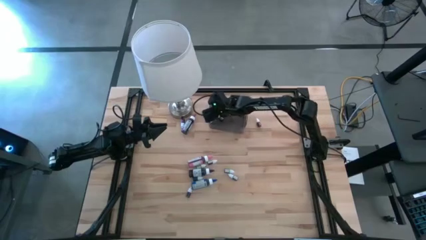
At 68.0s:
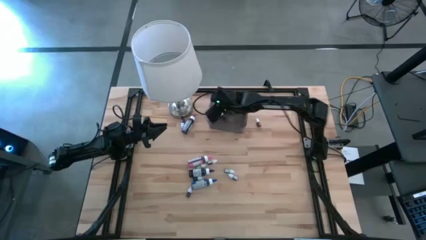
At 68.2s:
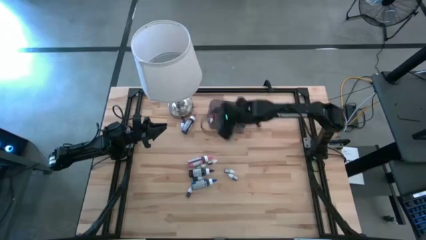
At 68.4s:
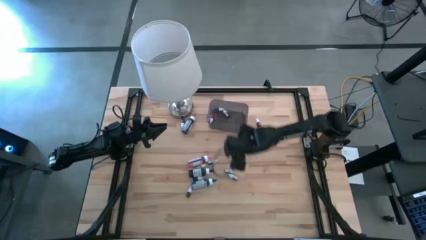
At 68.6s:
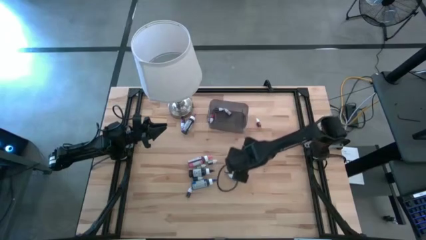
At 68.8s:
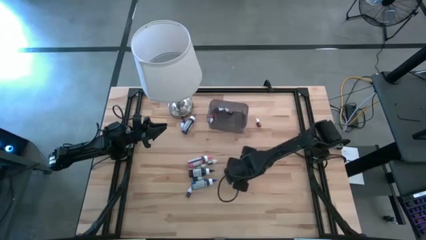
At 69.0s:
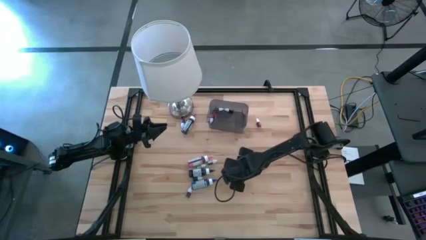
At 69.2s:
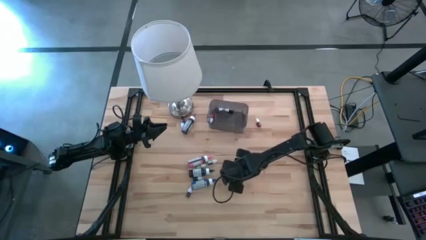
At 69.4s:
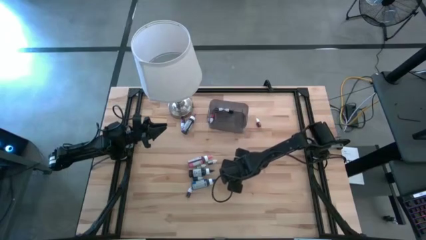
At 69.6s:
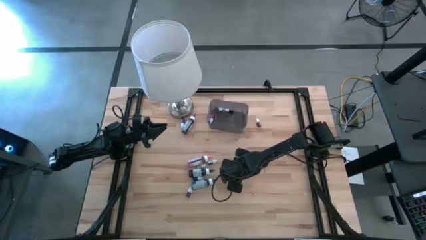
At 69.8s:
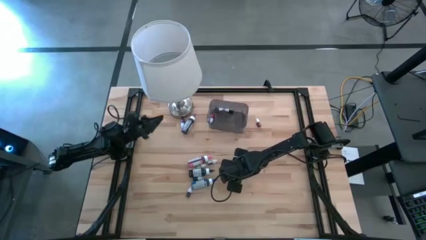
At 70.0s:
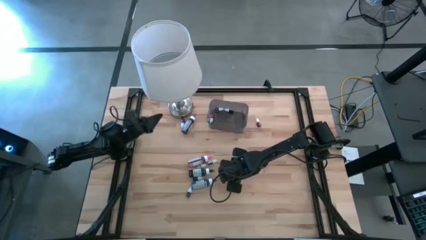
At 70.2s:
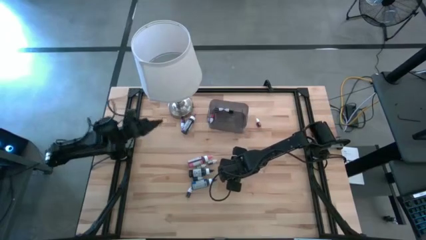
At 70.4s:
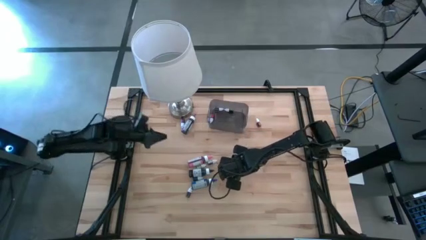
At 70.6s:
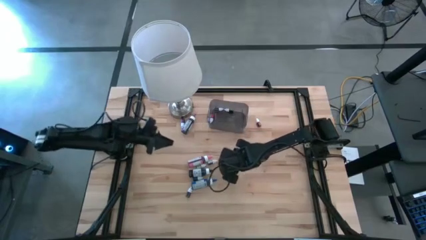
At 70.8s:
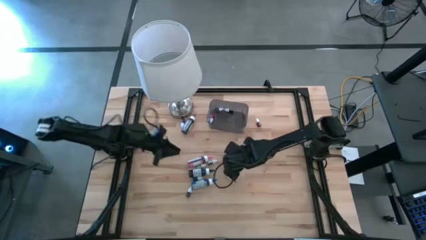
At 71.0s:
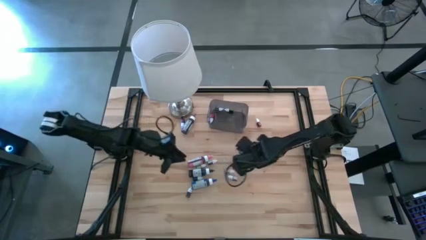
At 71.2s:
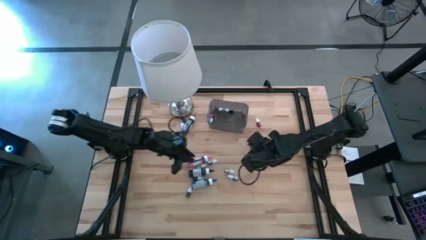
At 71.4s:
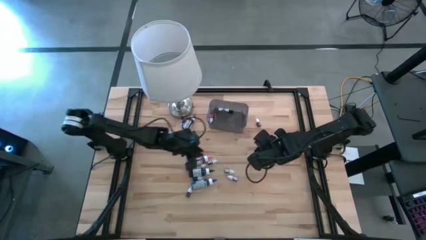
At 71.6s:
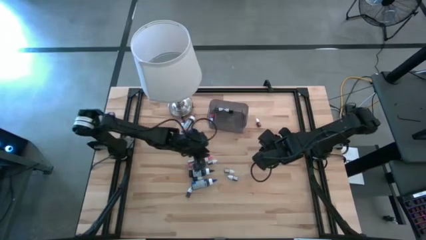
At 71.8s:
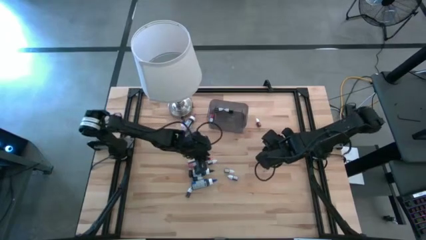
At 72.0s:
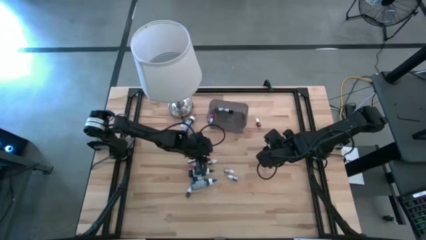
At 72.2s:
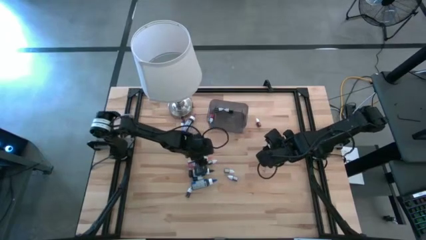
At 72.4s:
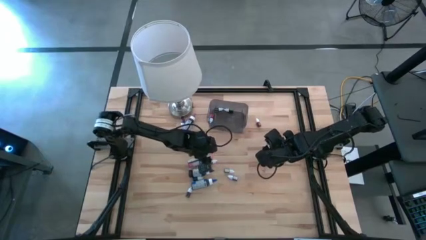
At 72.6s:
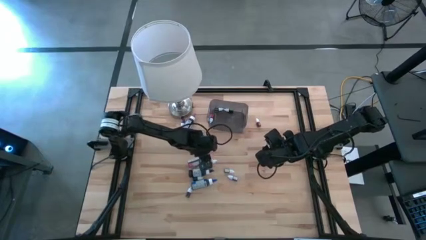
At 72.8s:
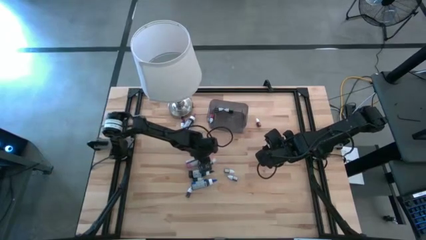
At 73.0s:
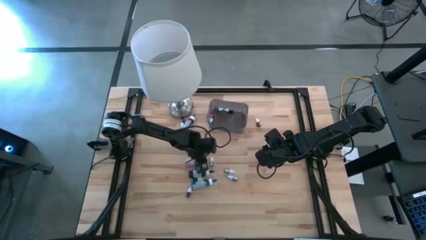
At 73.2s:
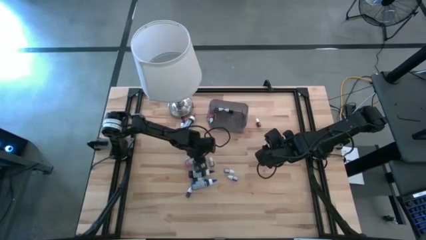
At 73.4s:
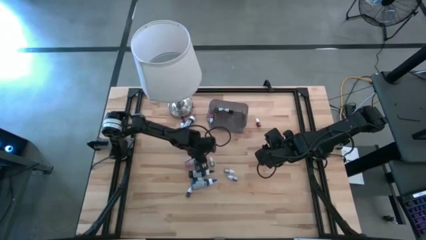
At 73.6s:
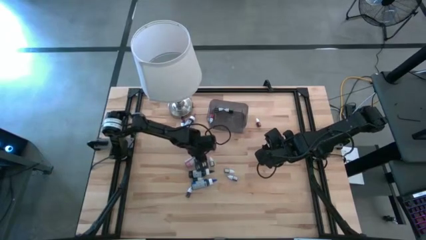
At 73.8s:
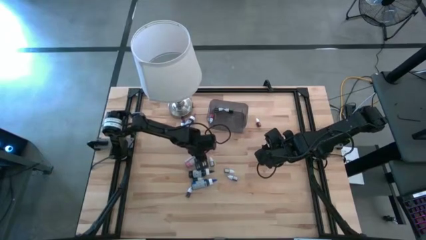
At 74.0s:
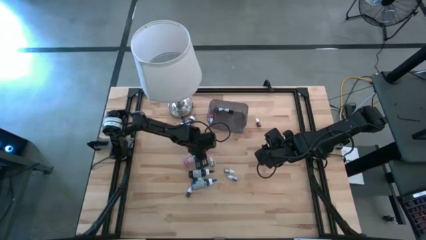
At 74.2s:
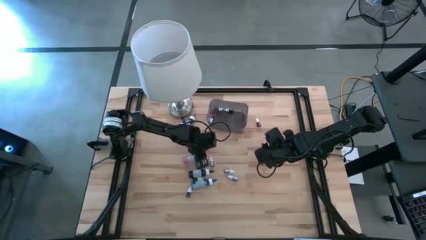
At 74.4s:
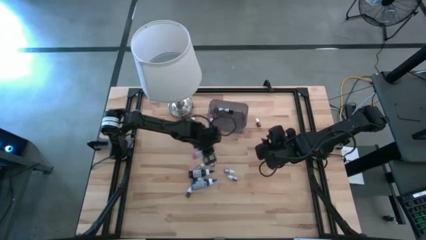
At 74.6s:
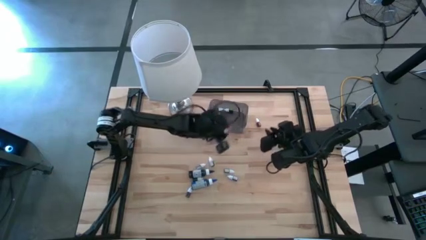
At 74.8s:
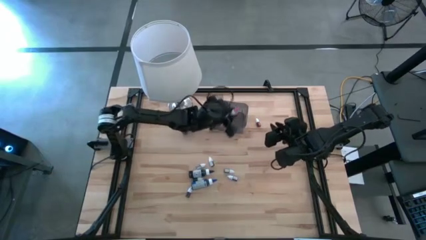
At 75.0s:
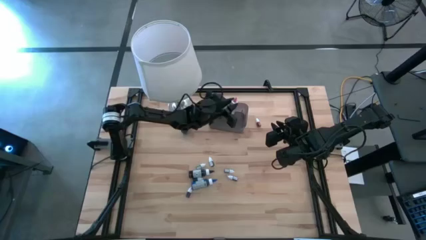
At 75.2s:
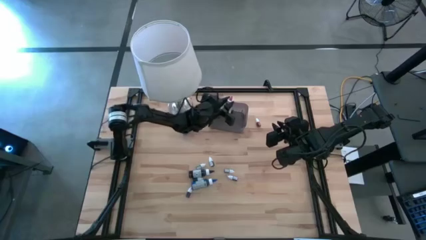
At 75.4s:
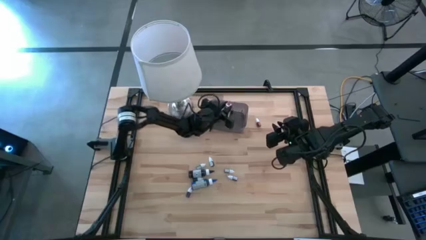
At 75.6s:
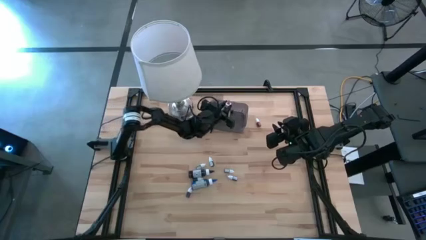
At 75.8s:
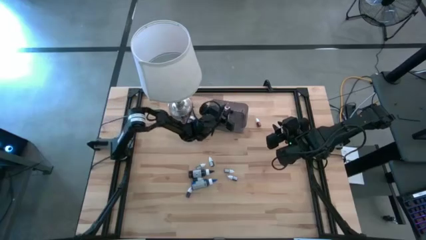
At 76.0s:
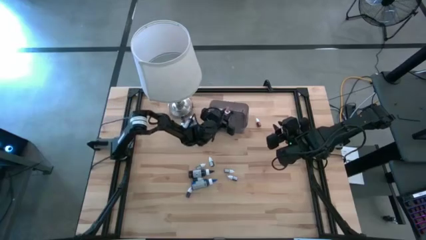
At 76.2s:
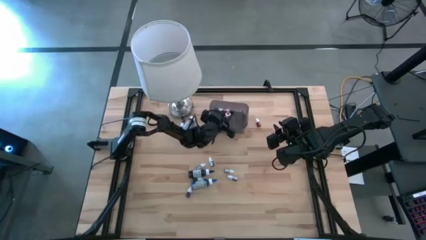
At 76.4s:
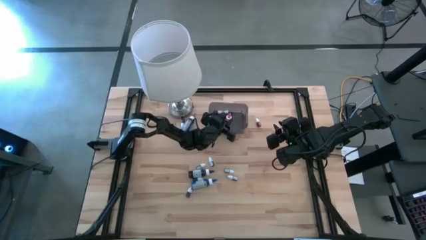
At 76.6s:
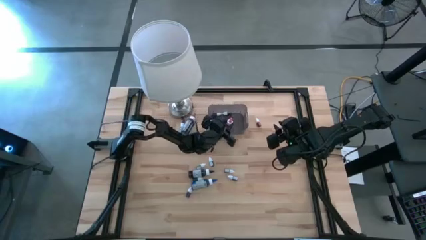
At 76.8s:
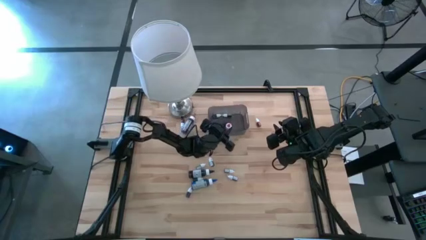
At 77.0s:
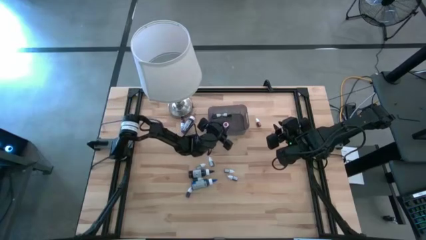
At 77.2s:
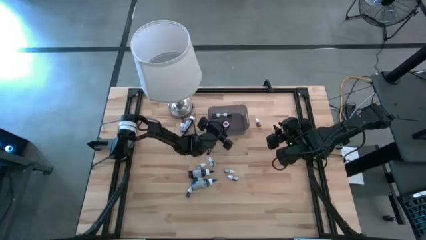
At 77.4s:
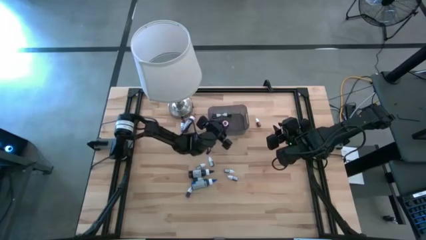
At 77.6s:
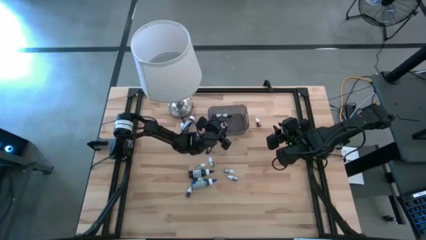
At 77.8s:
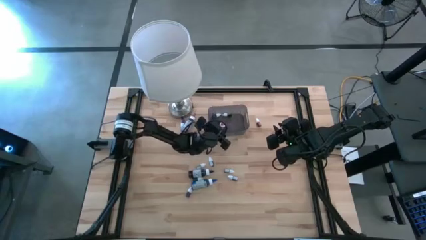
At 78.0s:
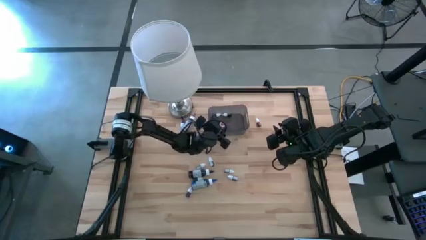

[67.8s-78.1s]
Task: Pick & Place food coloring
Put the large pink food coloring bottle into the bin

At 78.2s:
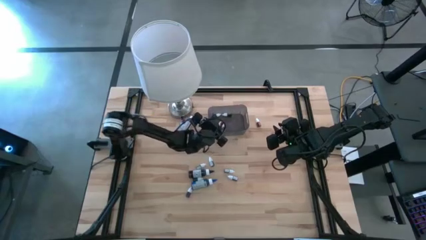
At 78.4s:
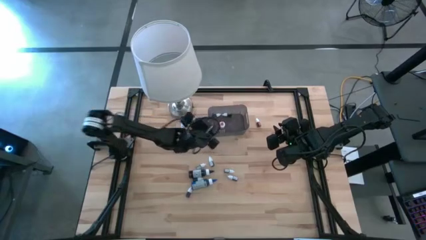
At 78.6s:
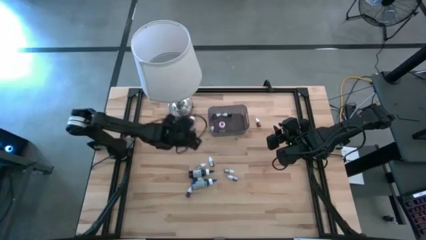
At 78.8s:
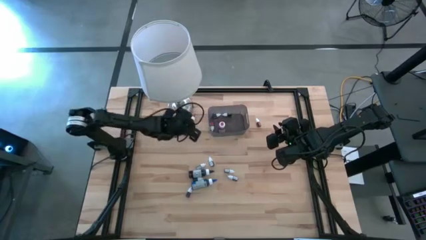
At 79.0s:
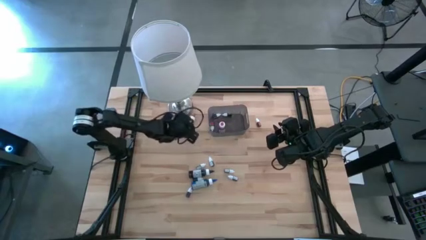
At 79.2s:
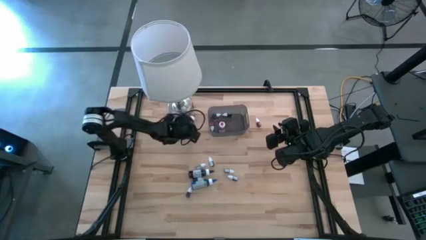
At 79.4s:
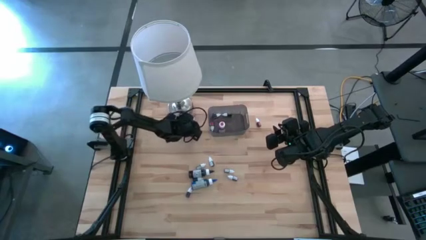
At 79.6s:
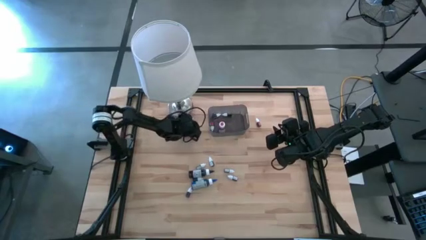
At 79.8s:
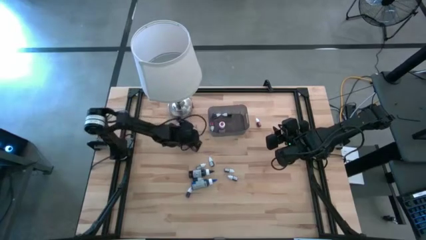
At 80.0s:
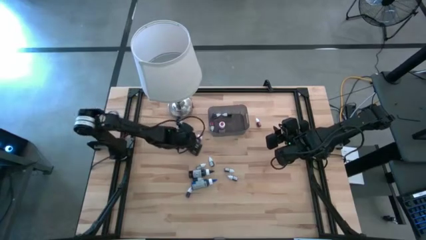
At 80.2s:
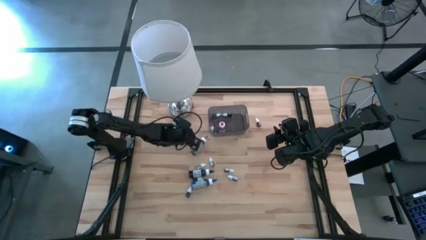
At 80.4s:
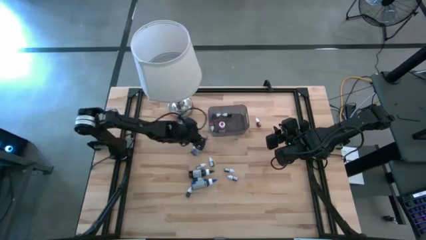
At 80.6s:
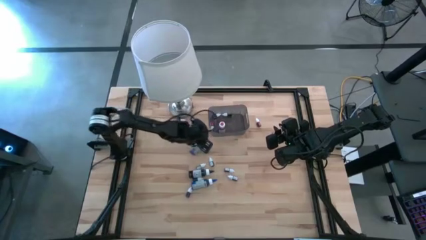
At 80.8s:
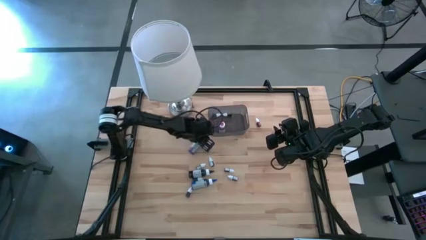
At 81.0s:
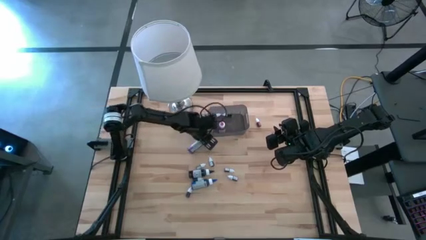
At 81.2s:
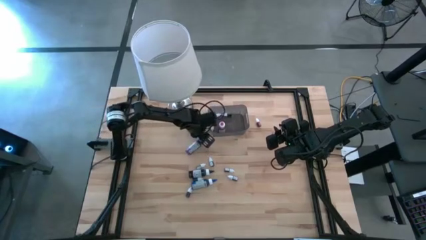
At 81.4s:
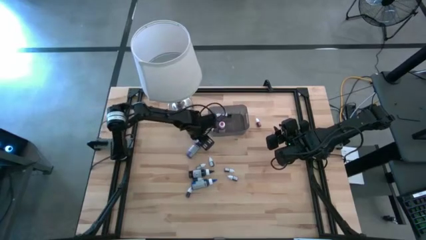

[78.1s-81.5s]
Put the large purple food coloring bottle into the bin
